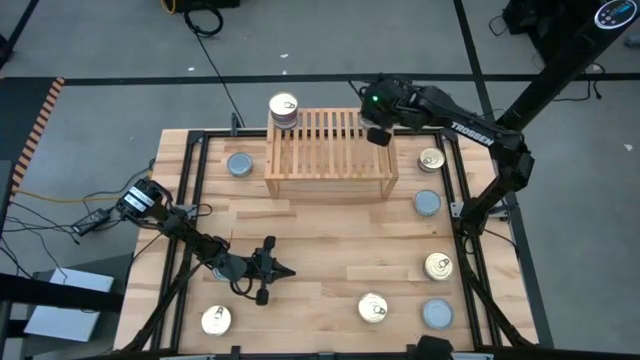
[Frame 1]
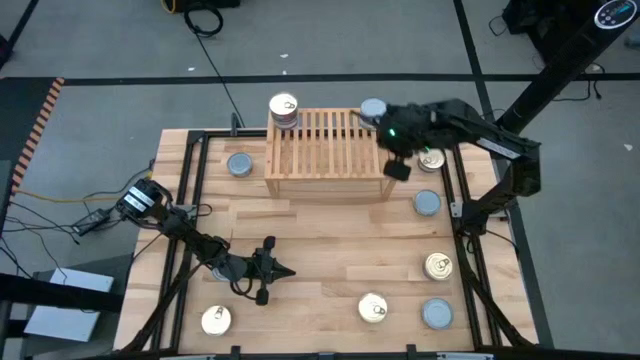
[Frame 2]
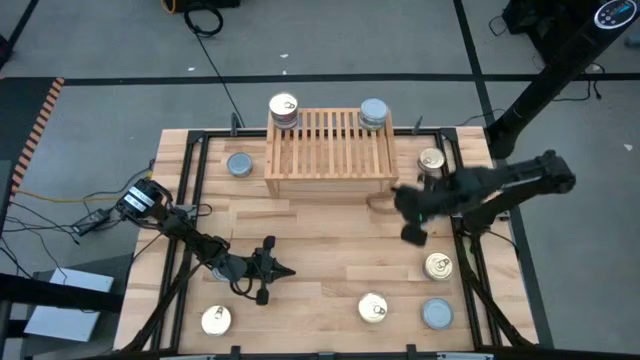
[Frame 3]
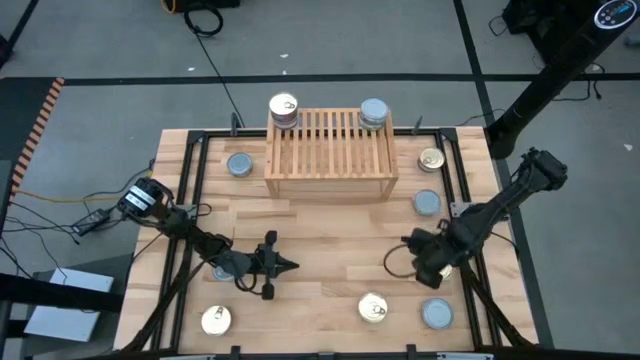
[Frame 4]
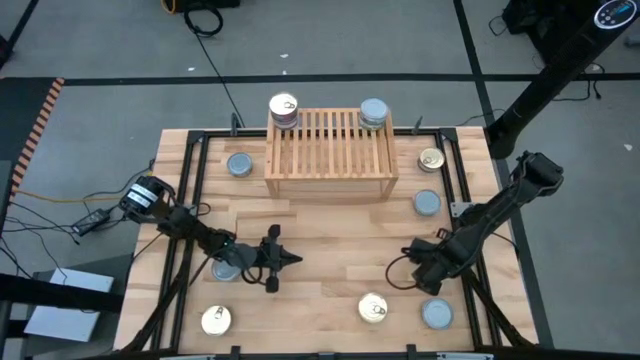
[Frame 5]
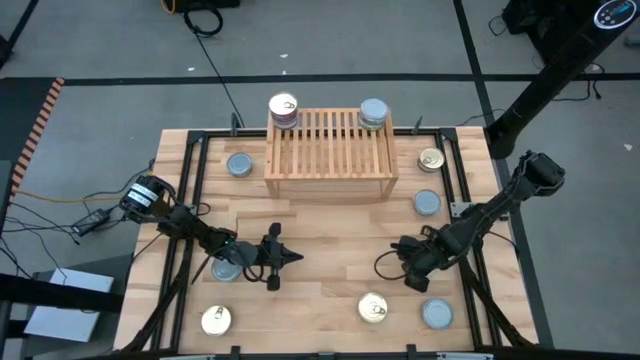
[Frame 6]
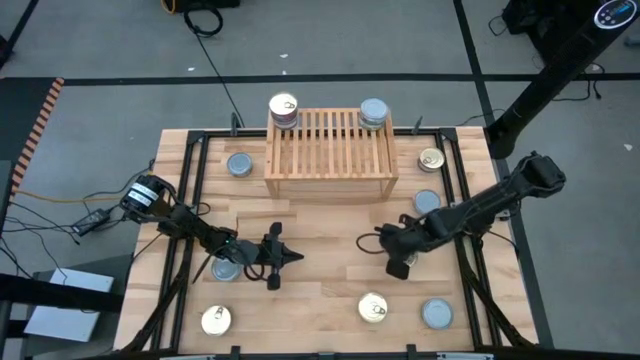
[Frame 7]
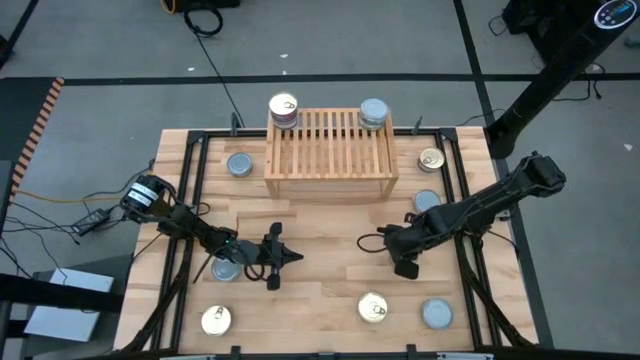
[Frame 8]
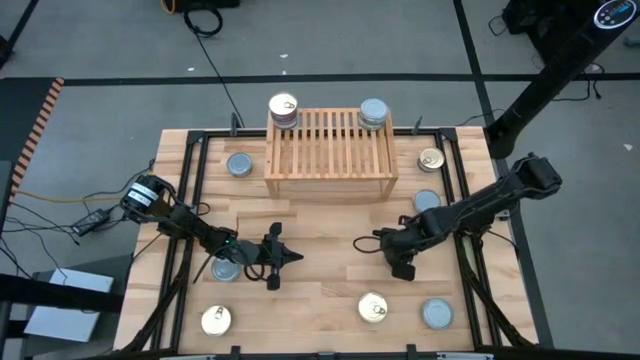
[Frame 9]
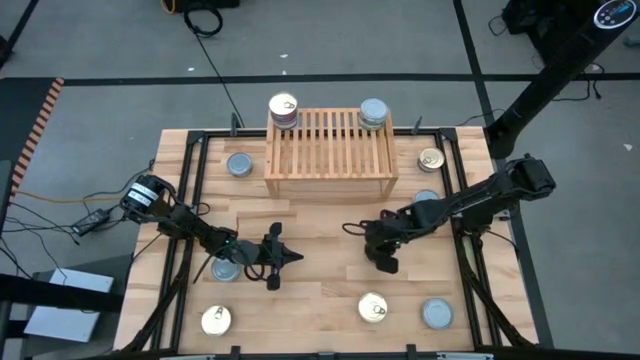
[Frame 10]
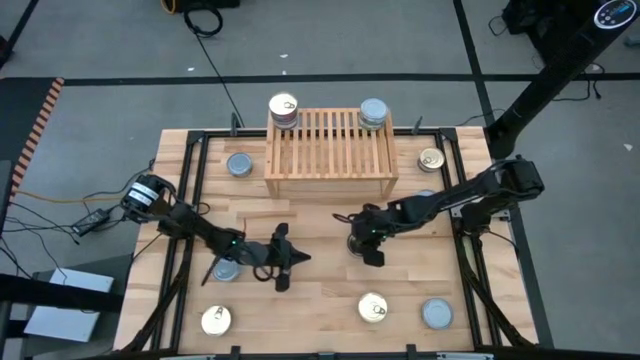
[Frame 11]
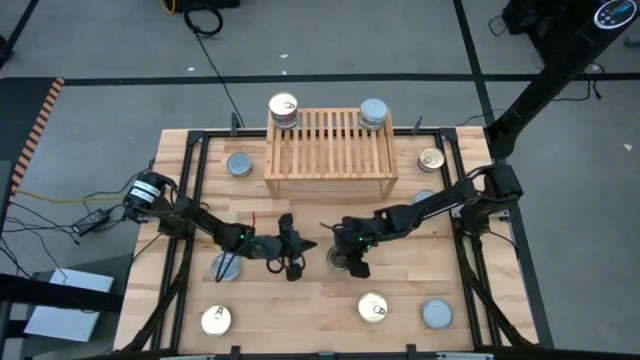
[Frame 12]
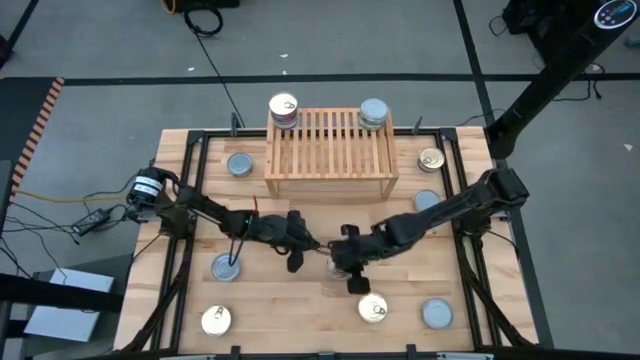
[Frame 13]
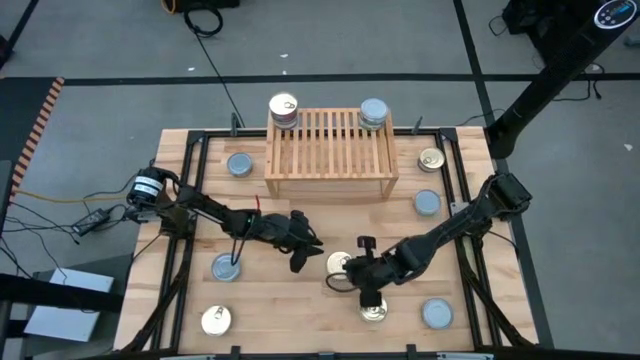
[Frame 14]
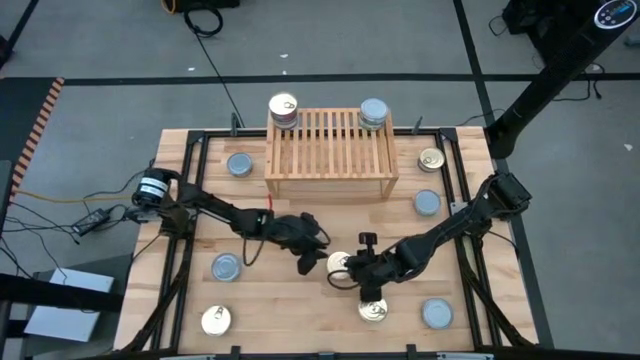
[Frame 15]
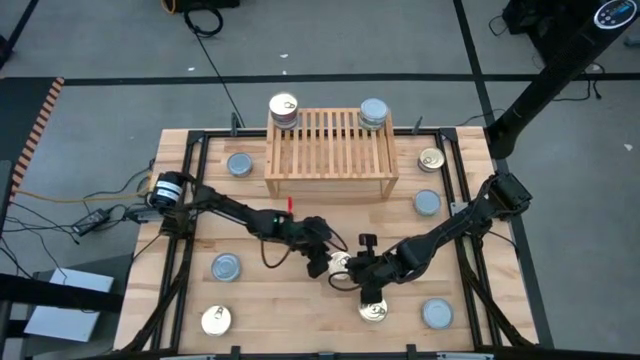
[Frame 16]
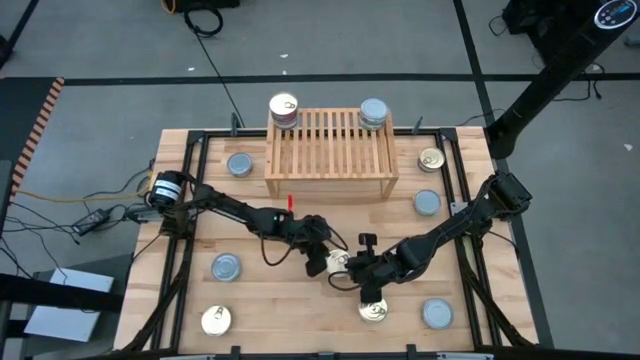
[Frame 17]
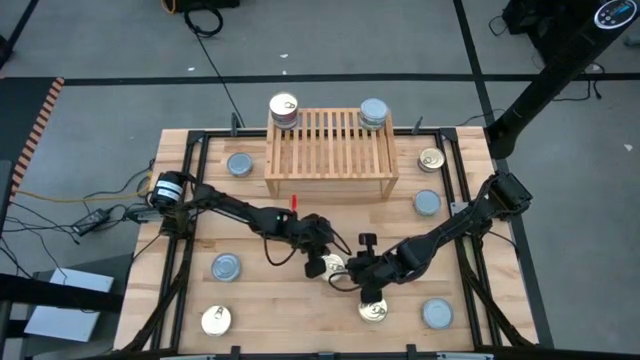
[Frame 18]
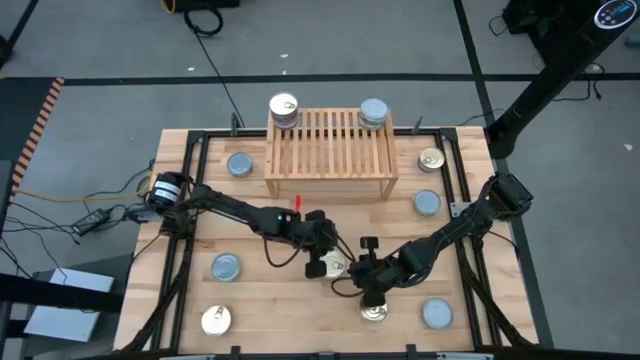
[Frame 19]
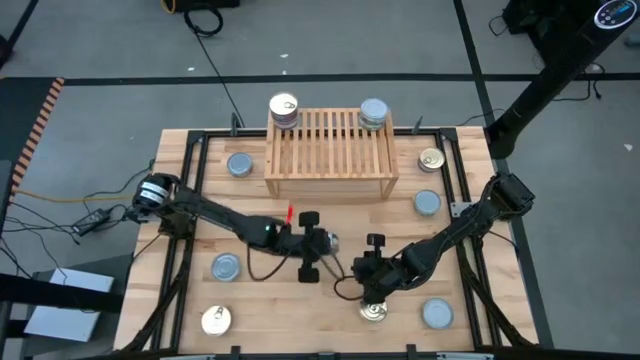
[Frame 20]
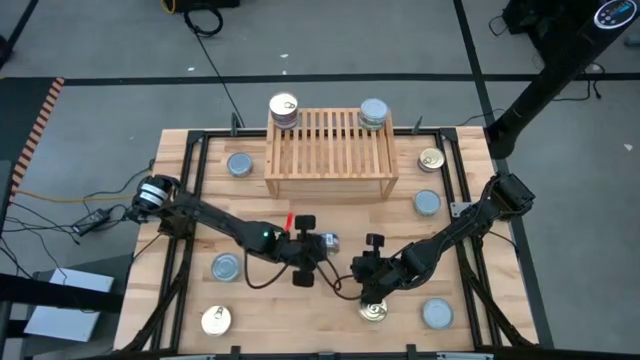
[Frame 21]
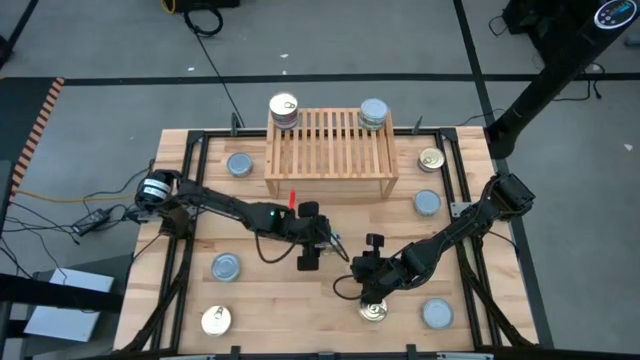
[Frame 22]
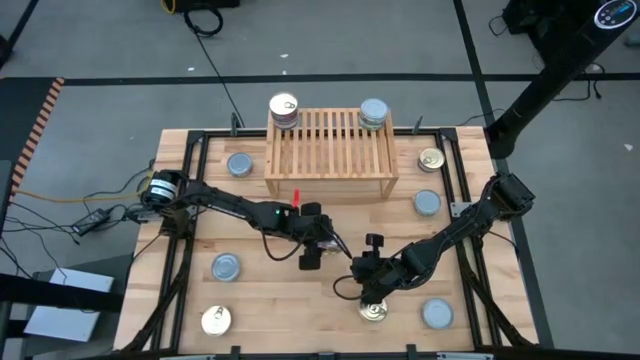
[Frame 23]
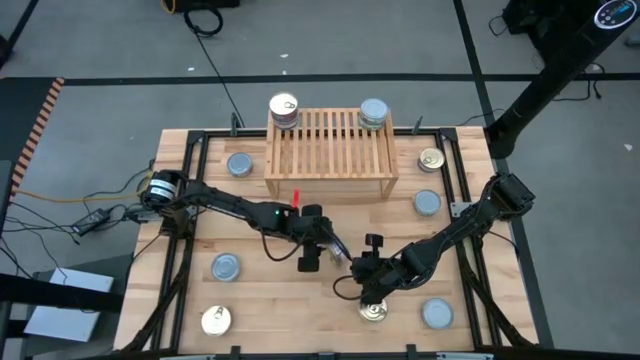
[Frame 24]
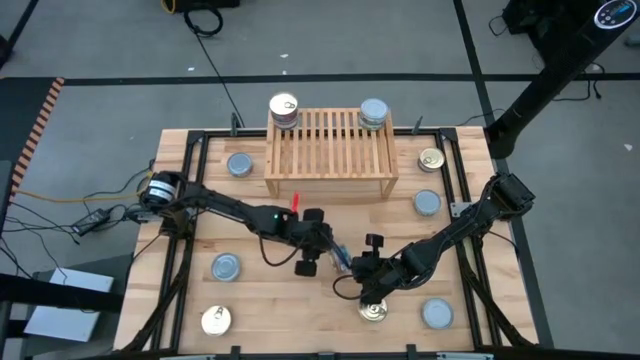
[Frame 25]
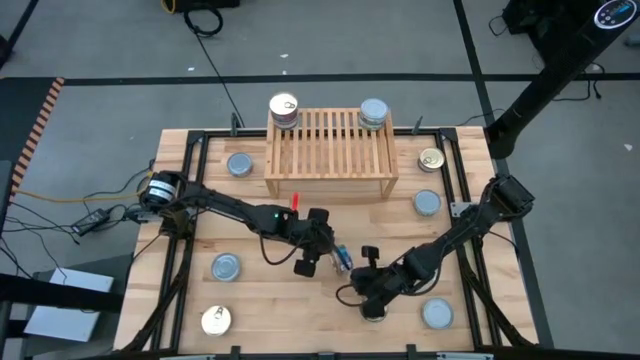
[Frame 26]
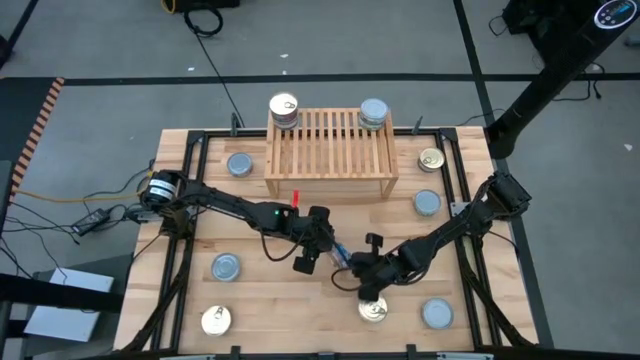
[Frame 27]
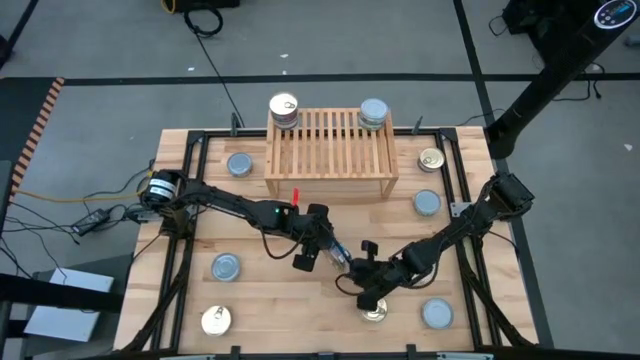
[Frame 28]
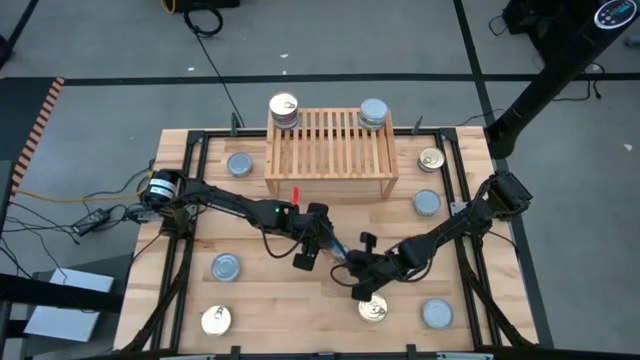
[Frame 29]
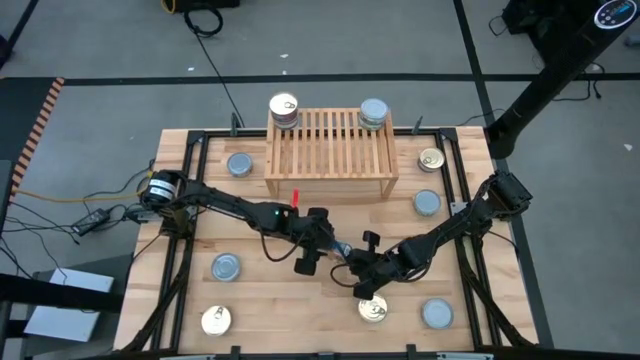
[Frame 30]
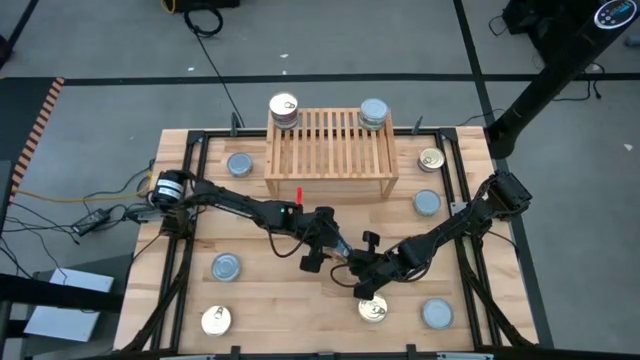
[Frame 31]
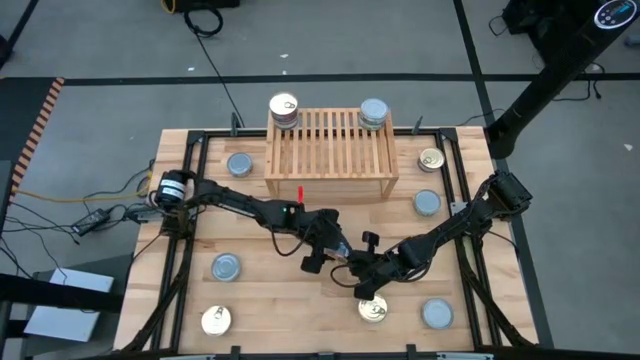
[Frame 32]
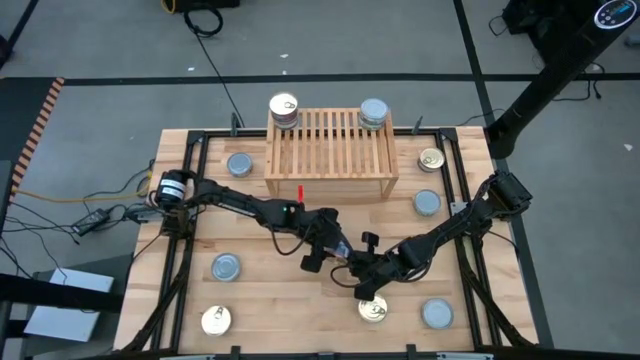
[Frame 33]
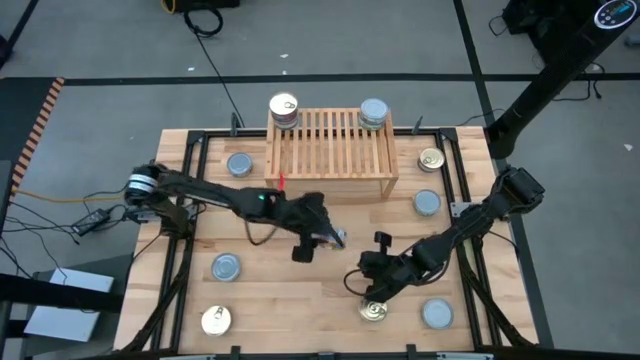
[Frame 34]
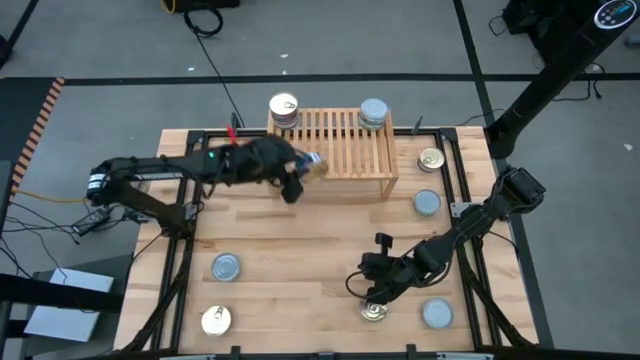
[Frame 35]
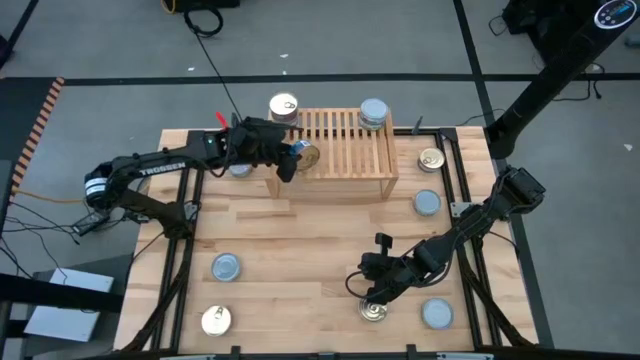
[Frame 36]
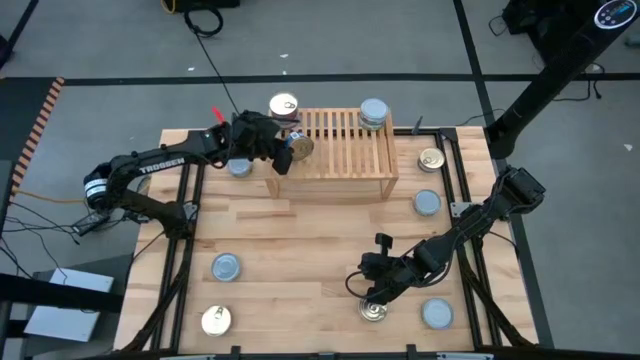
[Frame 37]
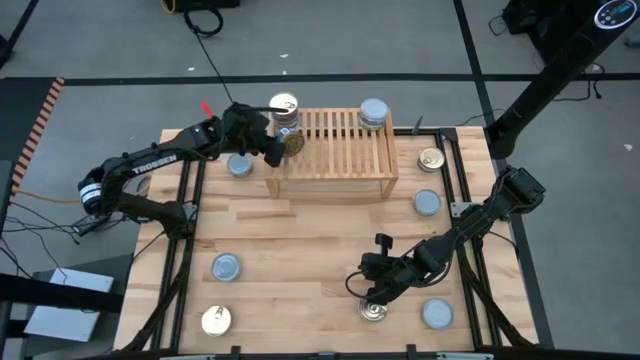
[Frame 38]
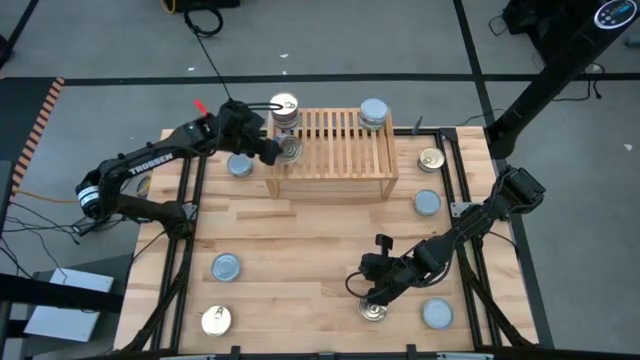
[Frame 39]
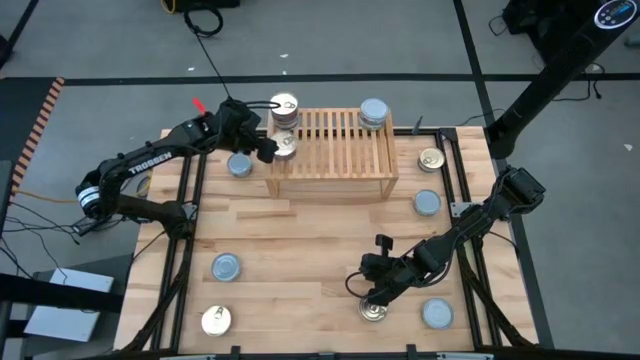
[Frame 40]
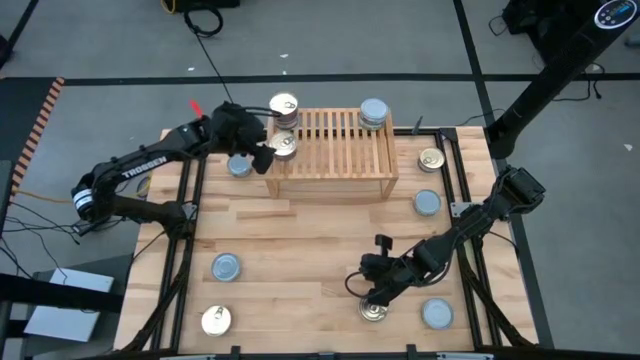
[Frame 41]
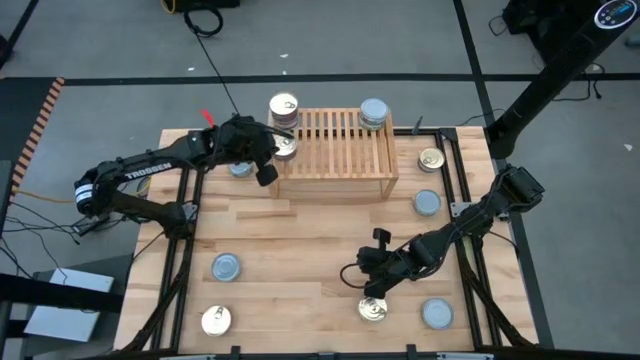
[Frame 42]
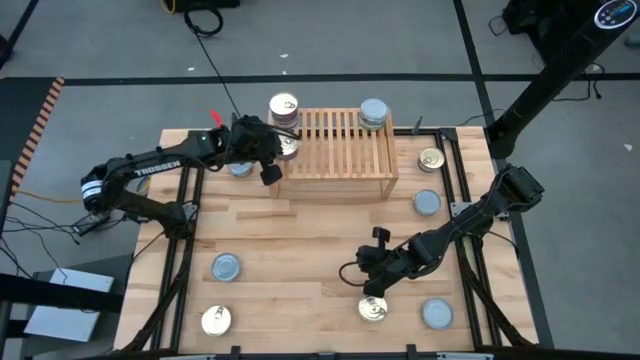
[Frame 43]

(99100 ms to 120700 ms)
Task: Stack canned seafood by type on shelf
Put the blue pink tuna can on the shelf
